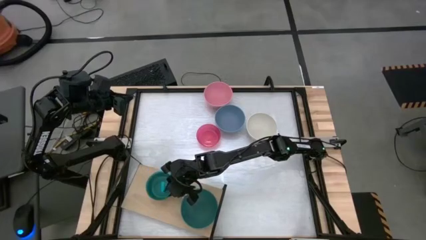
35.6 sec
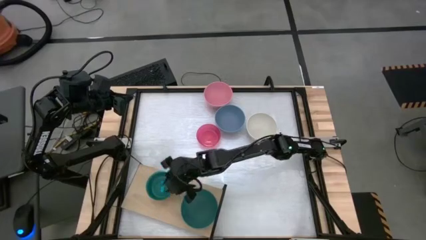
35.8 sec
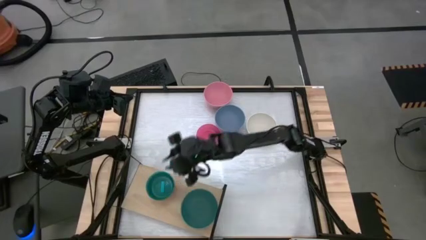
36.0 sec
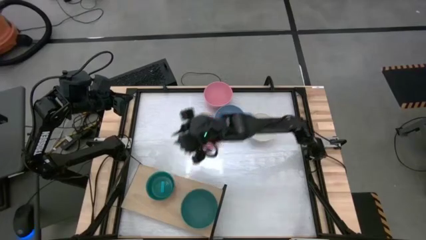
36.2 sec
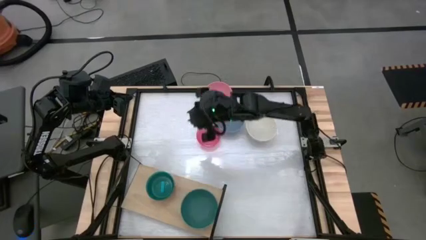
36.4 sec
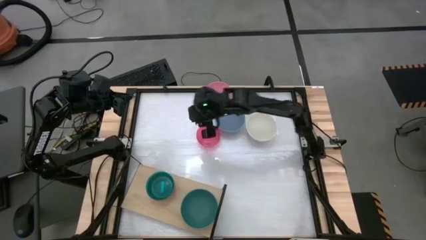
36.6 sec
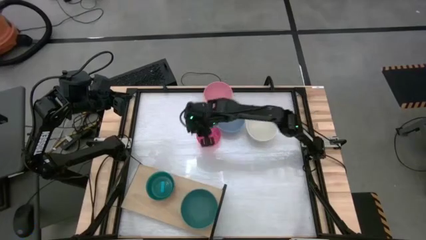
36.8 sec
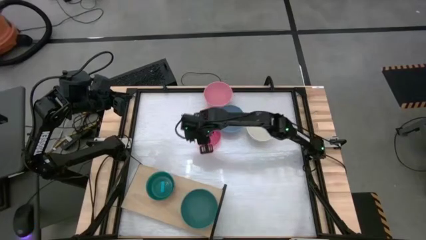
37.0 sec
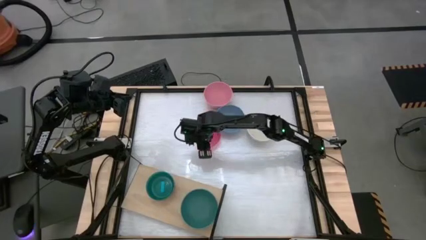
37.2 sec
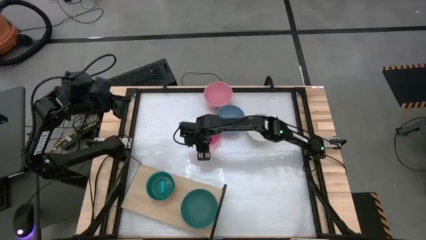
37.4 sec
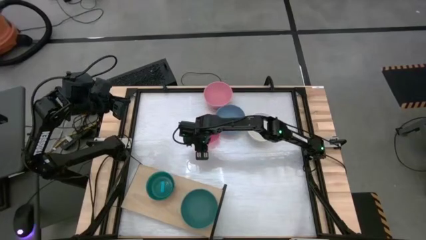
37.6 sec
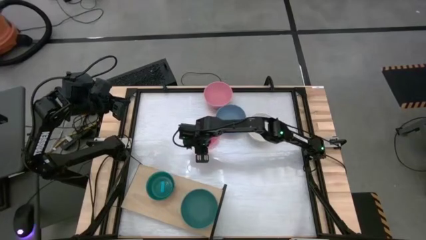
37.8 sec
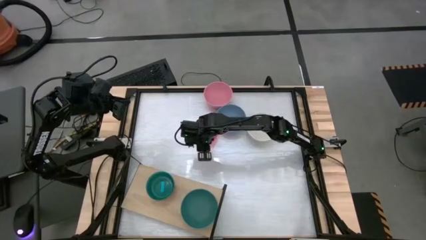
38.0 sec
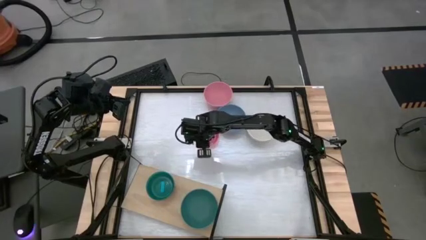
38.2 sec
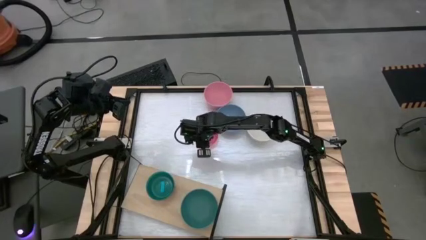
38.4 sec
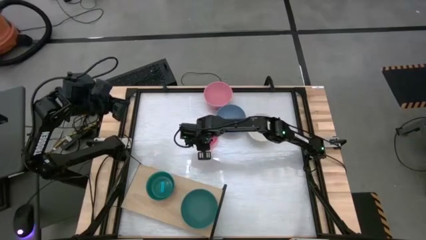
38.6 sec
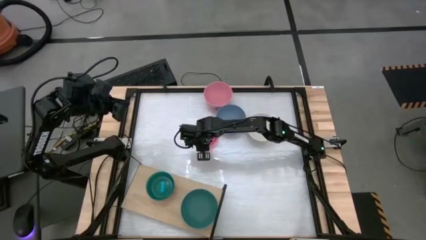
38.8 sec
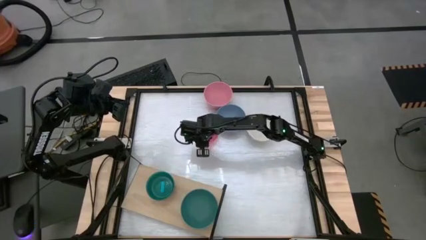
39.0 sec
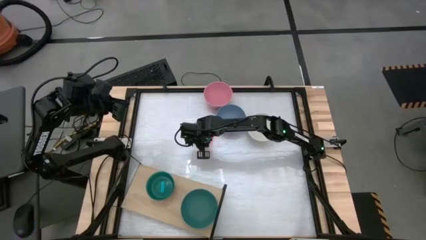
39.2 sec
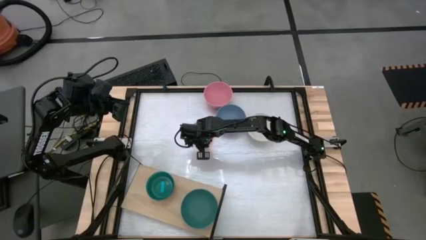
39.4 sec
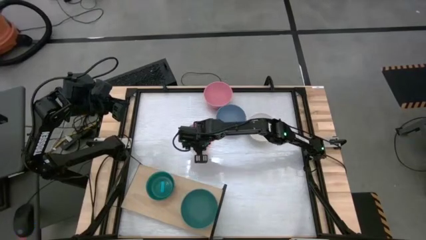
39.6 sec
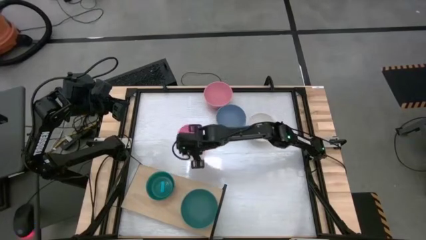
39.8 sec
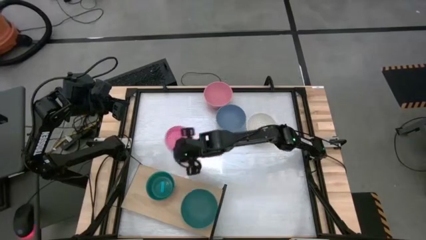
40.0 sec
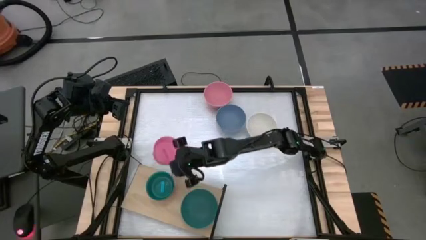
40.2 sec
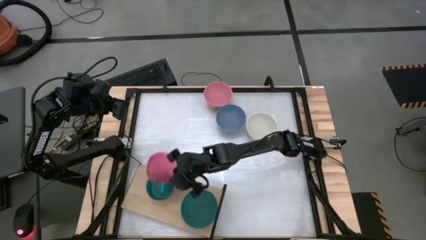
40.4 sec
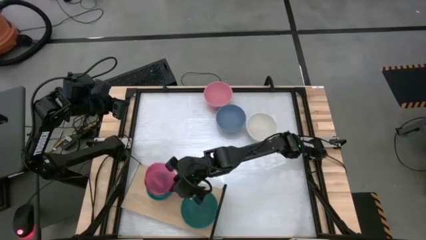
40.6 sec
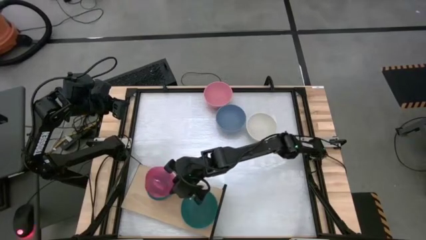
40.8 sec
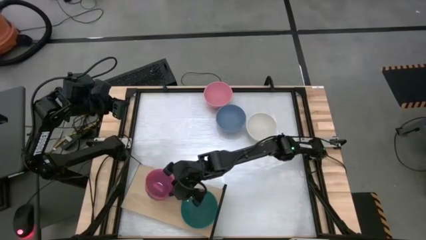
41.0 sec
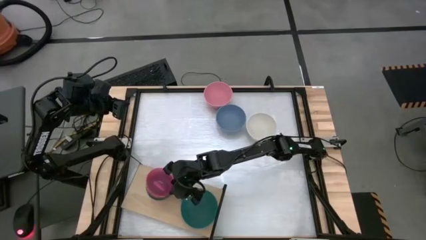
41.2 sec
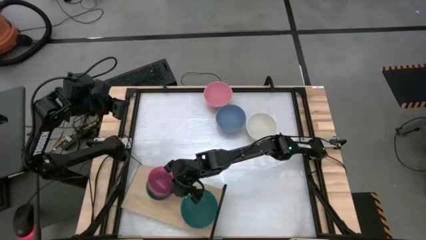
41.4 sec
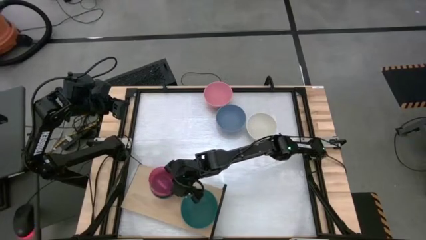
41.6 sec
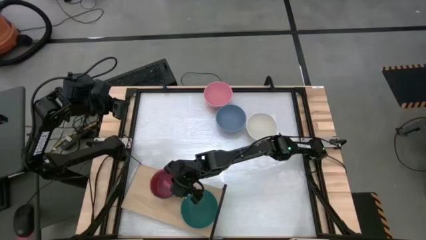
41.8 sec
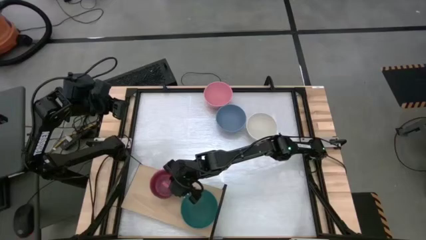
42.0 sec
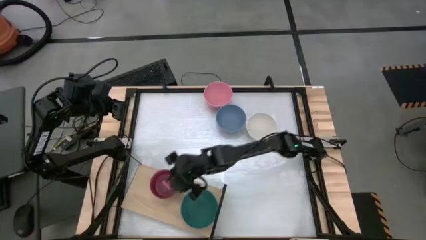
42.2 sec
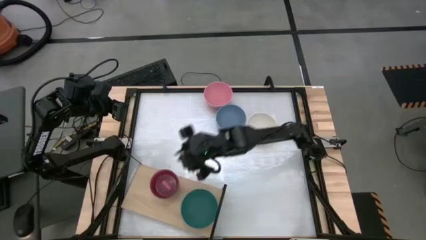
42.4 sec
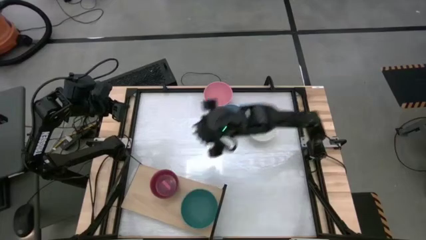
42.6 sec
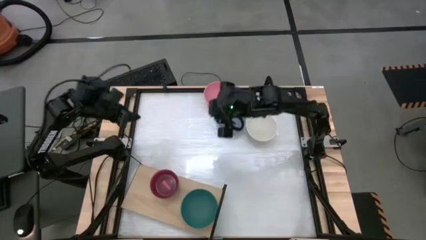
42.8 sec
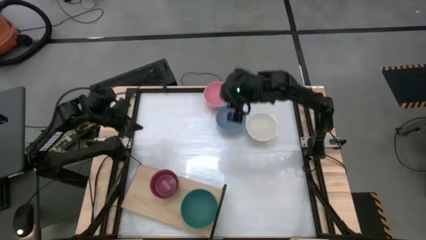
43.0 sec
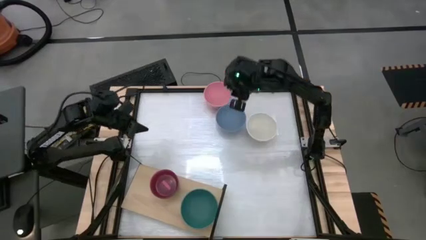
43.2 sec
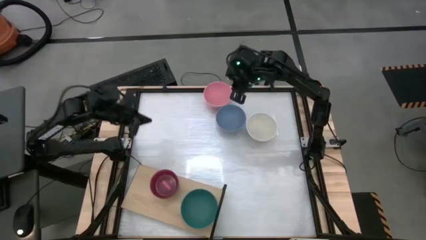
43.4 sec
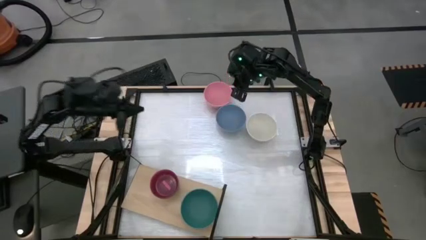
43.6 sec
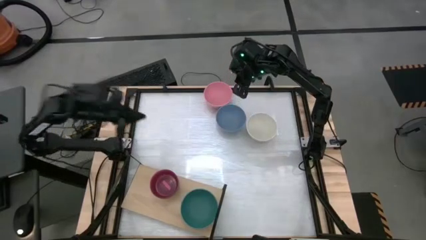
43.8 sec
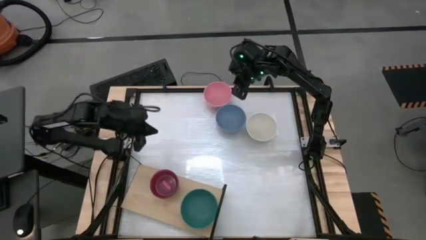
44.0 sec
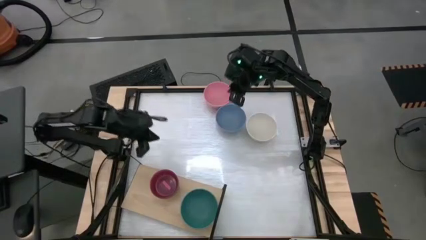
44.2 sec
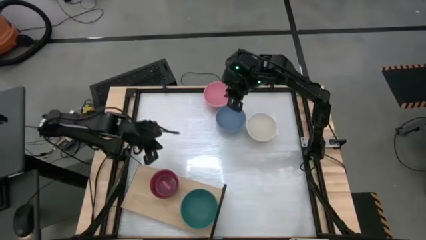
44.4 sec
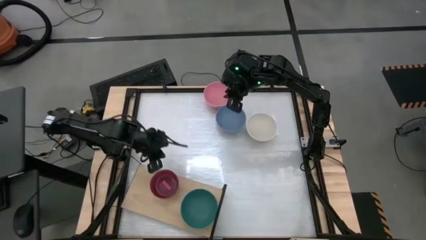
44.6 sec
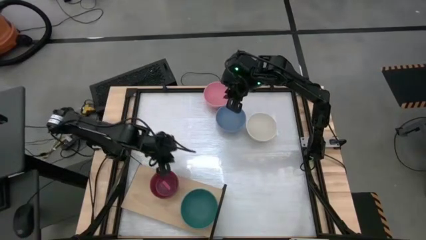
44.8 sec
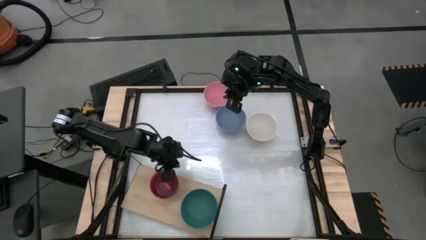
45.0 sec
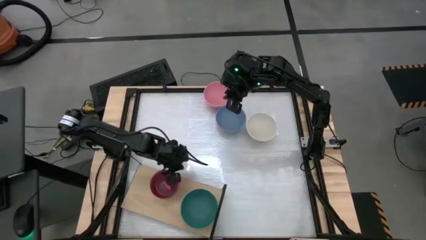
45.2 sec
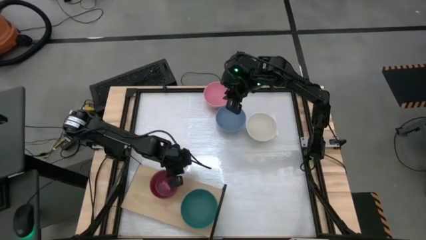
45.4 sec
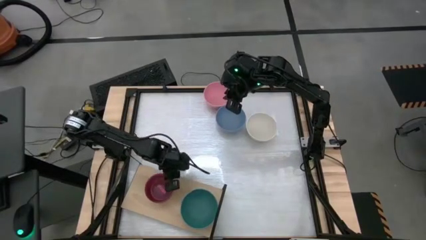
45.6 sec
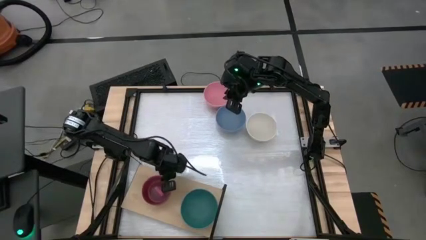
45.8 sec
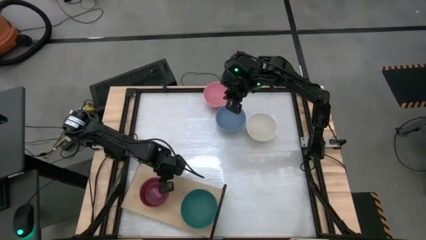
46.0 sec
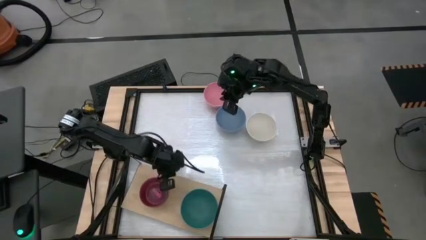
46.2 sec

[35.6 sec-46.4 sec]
Task: Place and stack bowls onto a shelf
Stack the pink bowl on top of the light blue bowl on the shelf
